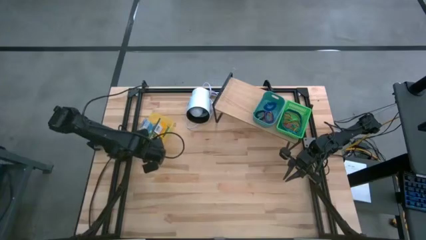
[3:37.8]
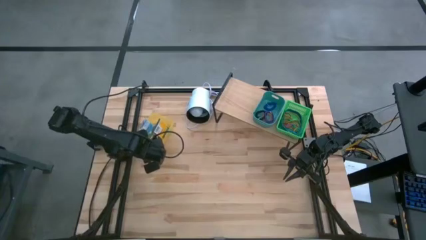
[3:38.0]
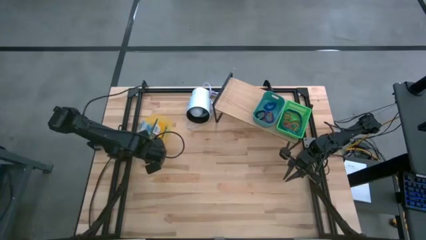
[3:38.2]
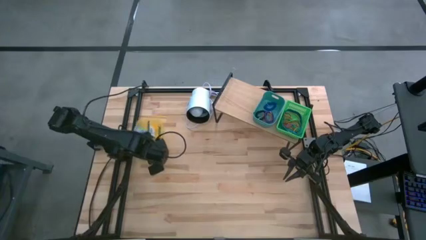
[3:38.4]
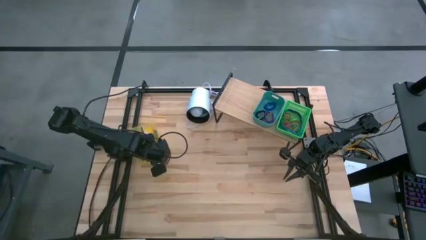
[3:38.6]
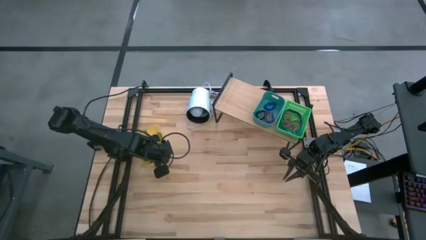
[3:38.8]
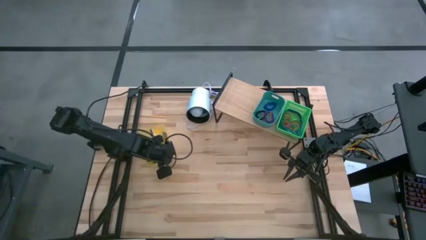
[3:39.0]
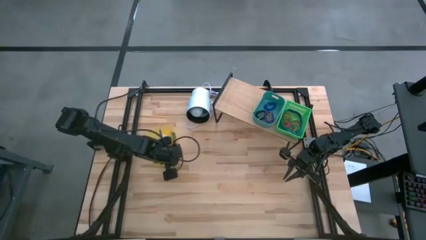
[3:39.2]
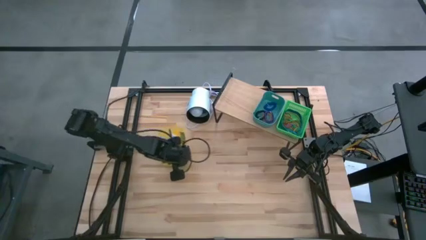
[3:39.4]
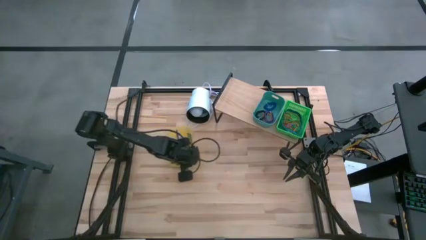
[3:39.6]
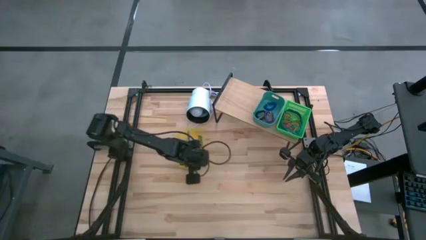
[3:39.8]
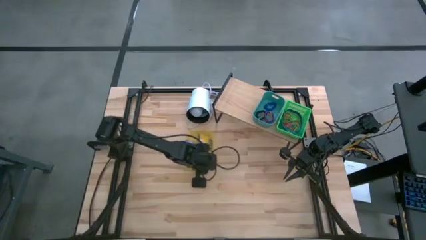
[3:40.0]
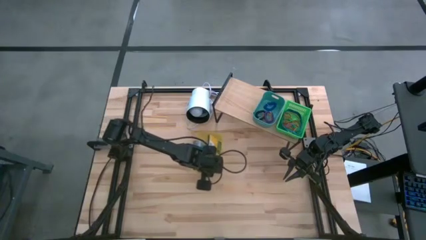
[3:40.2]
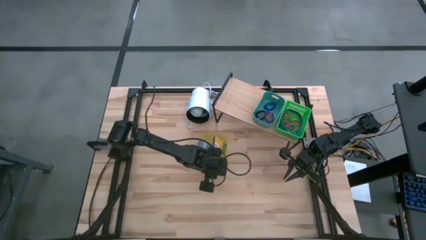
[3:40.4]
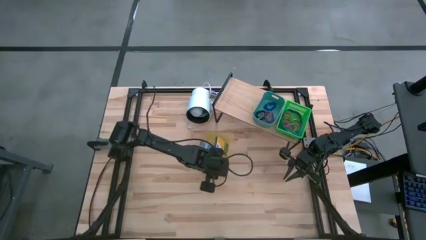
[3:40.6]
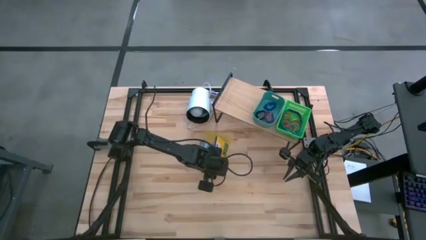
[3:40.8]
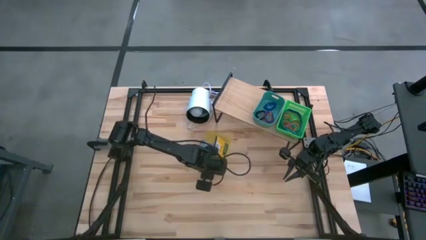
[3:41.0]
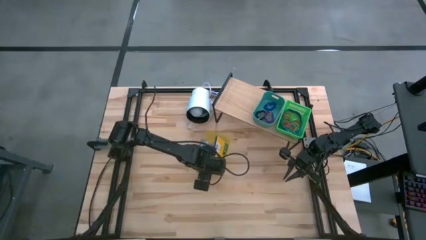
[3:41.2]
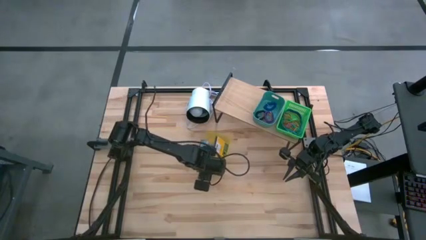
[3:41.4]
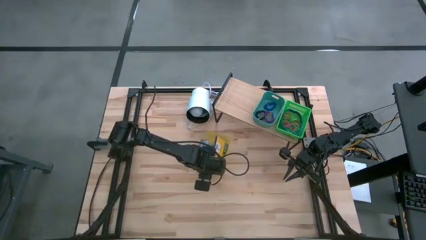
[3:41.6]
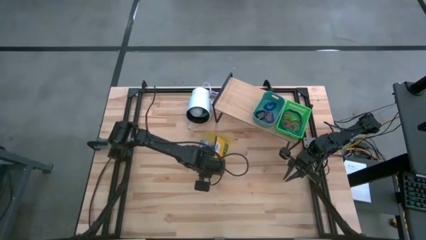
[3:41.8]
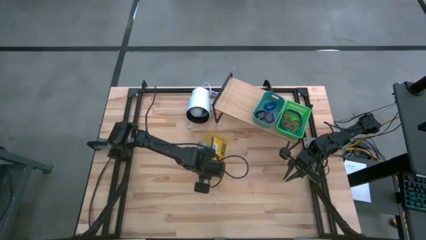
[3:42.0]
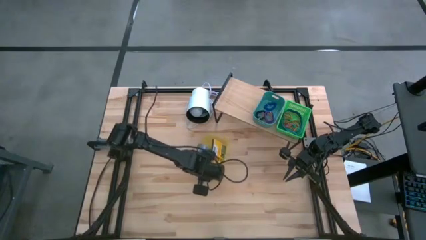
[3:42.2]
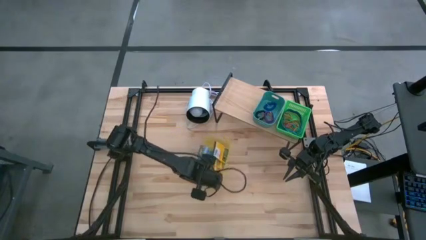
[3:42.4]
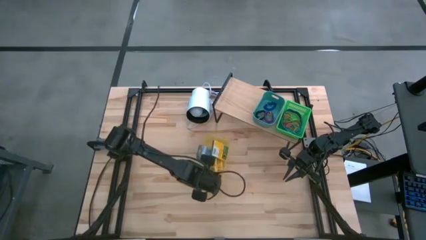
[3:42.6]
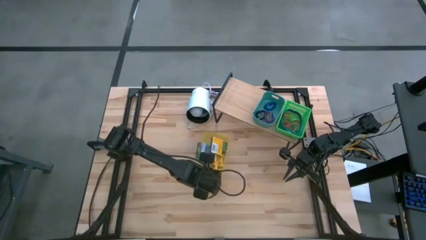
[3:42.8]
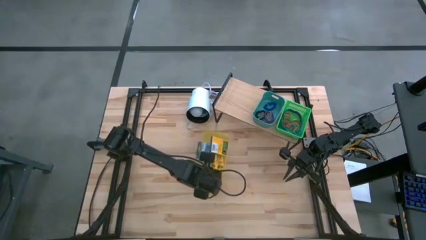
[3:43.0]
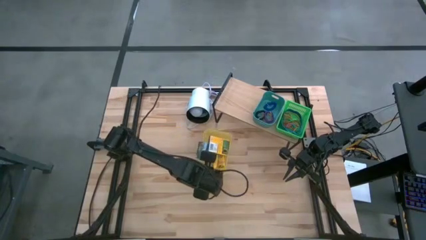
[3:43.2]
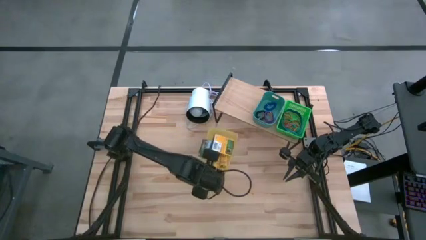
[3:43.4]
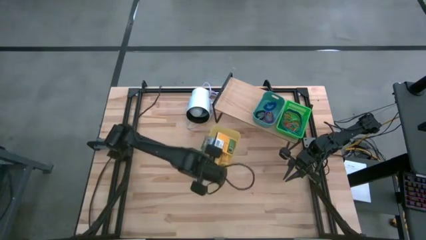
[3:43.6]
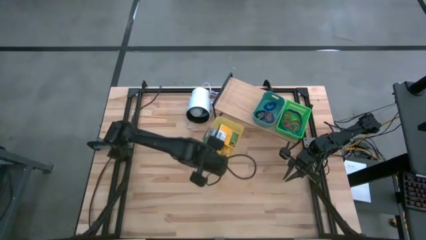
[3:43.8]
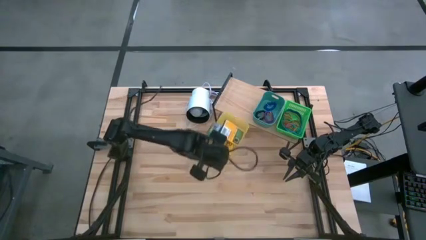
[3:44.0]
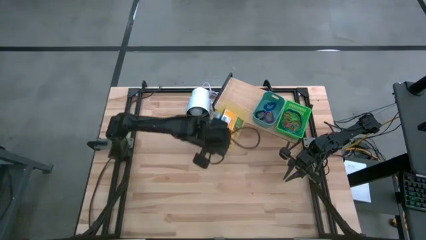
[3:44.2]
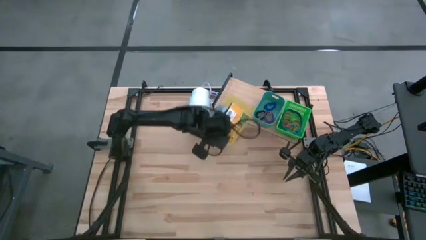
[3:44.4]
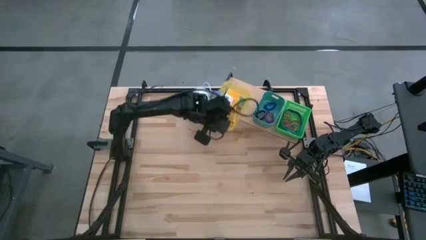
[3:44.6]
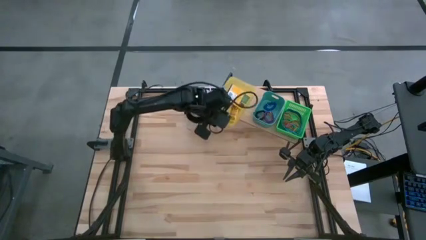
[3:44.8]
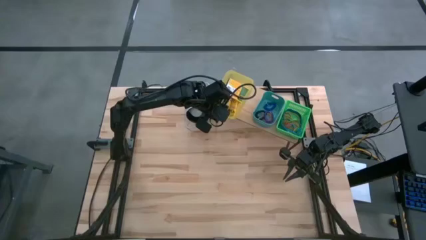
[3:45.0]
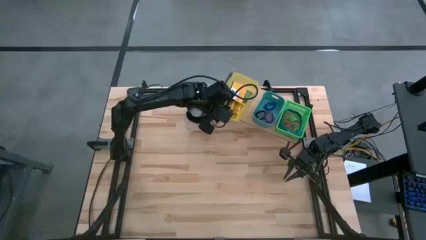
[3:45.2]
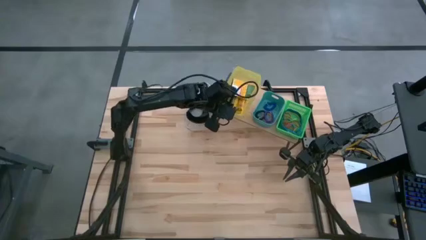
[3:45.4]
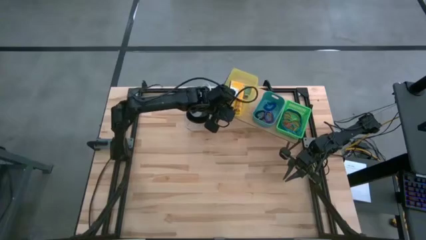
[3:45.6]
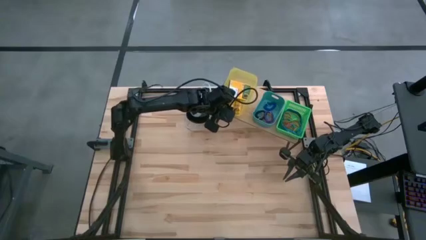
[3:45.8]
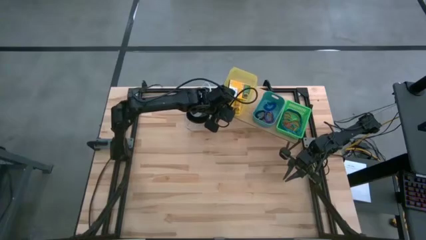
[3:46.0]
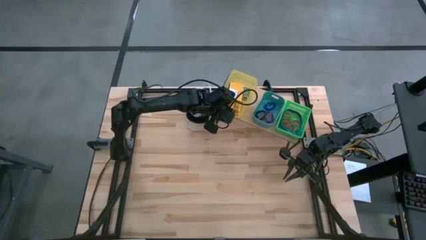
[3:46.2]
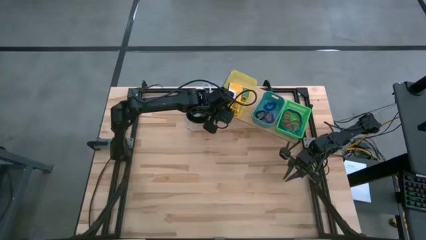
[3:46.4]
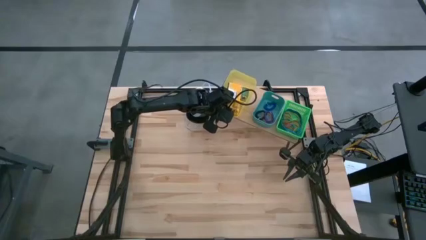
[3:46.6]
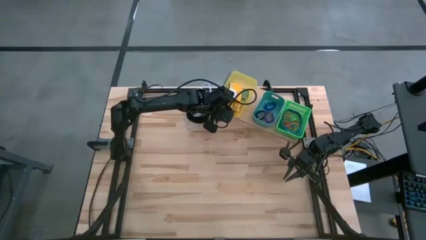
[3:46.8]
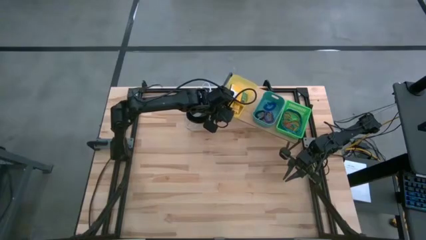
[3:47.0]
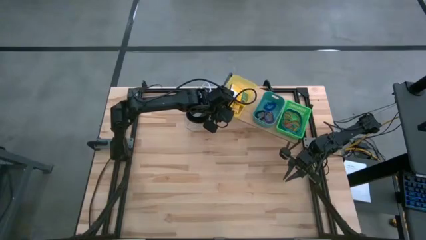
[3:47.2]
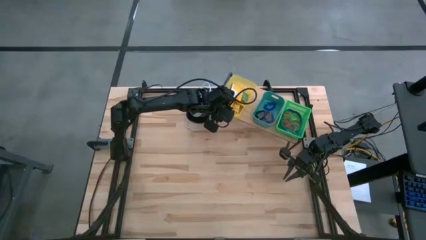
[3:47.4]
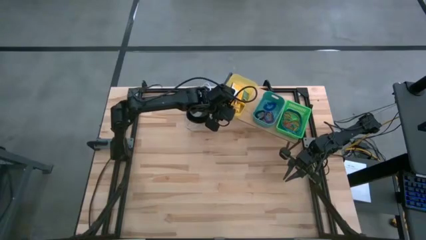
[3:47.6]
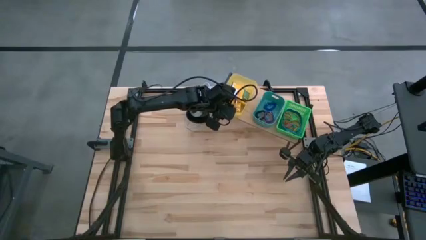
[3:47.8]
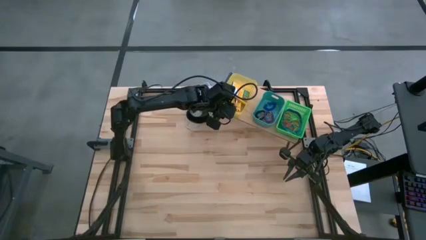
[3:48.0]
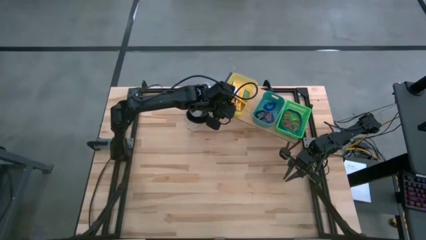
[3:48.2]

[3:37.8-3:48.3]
Task: Pick & Place Office Desk Supplies
Put the yellow bin on the shelf

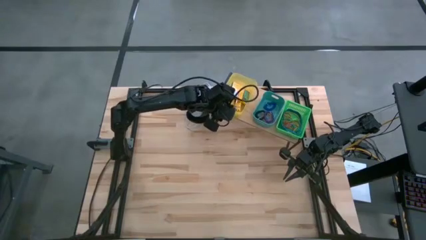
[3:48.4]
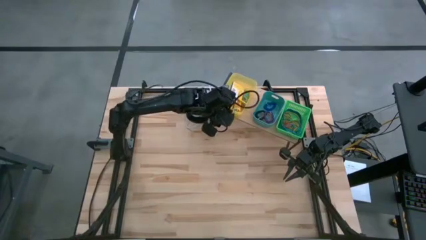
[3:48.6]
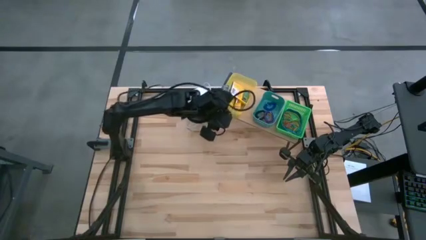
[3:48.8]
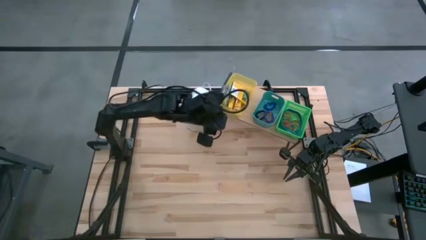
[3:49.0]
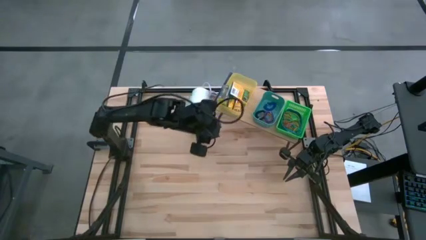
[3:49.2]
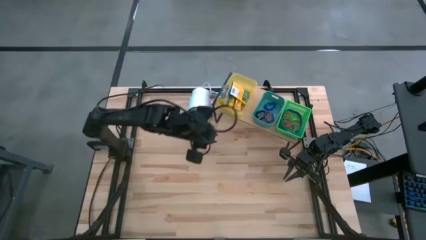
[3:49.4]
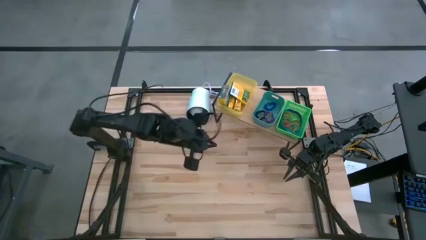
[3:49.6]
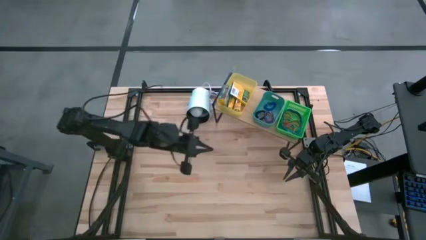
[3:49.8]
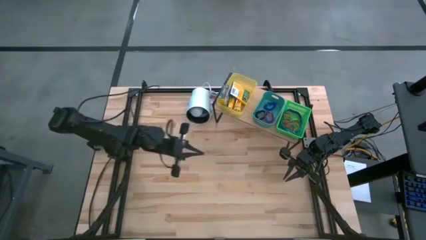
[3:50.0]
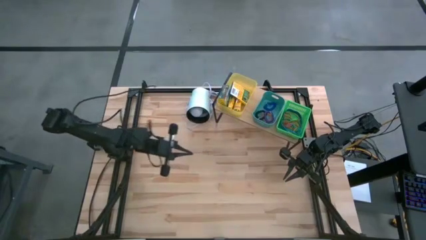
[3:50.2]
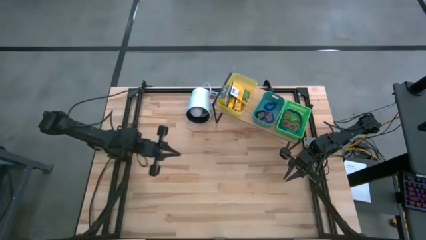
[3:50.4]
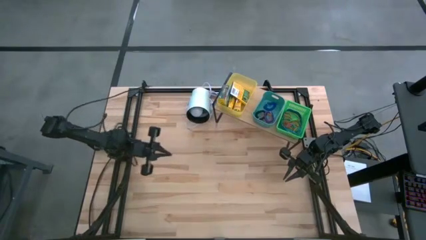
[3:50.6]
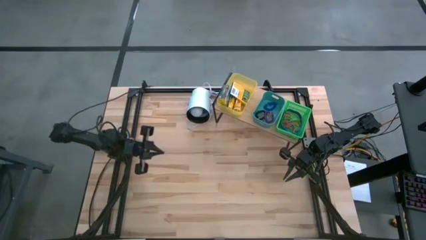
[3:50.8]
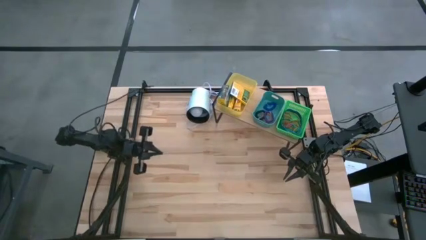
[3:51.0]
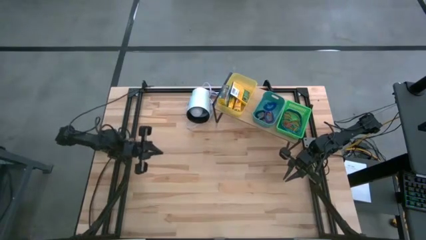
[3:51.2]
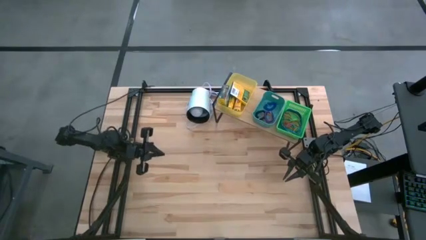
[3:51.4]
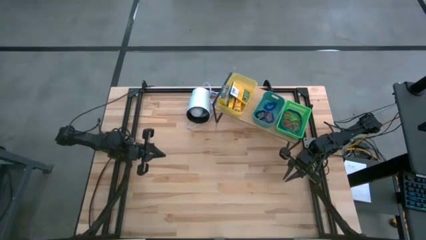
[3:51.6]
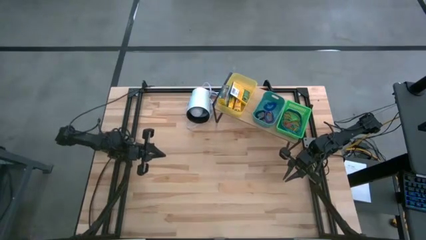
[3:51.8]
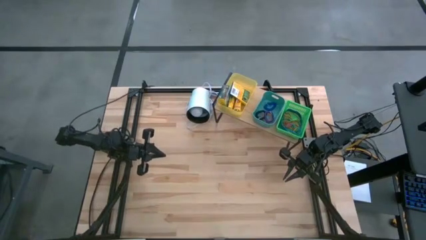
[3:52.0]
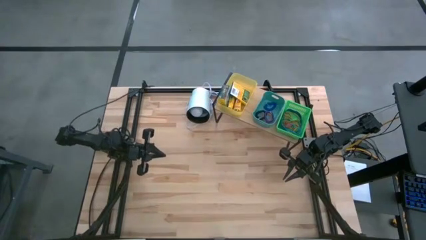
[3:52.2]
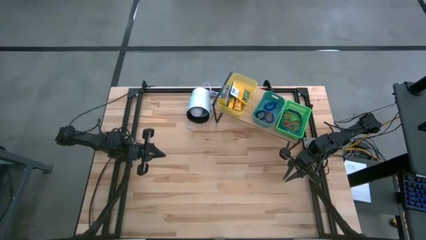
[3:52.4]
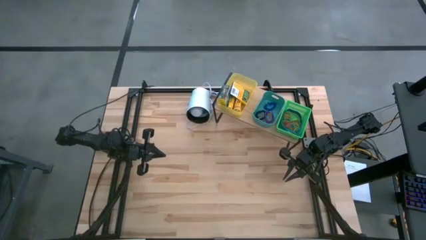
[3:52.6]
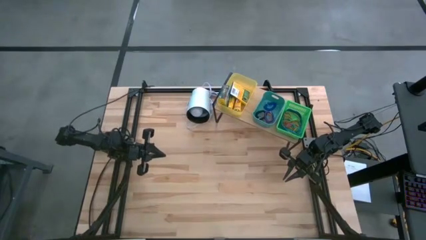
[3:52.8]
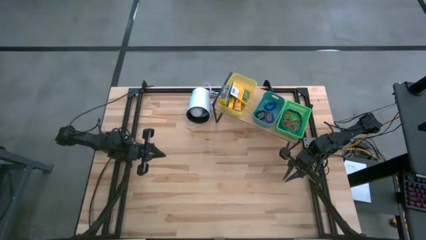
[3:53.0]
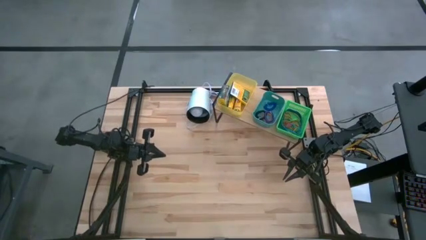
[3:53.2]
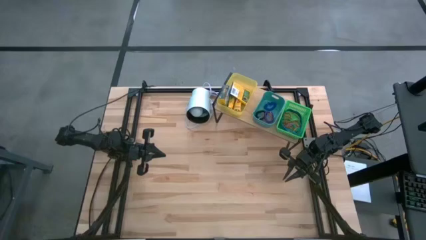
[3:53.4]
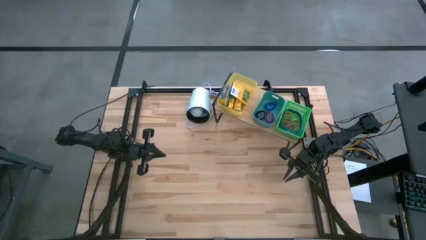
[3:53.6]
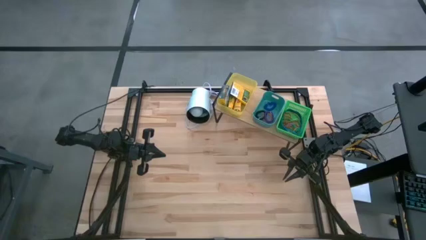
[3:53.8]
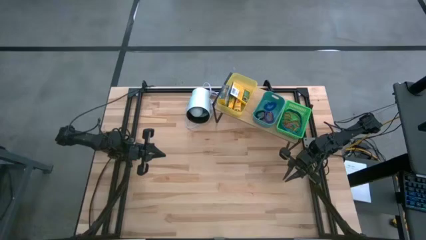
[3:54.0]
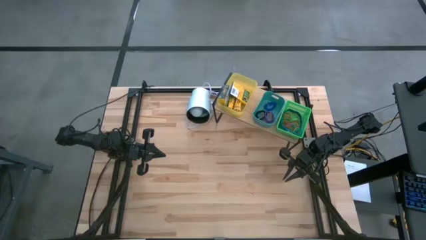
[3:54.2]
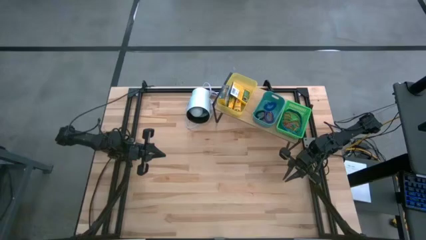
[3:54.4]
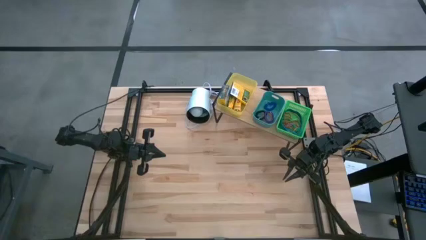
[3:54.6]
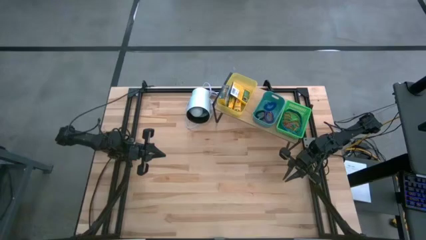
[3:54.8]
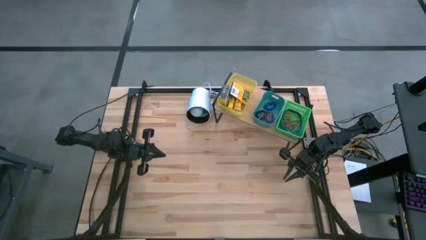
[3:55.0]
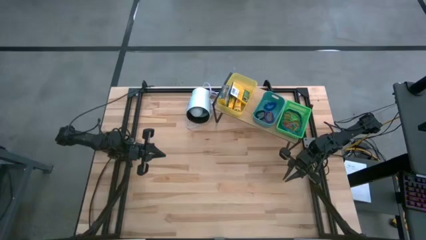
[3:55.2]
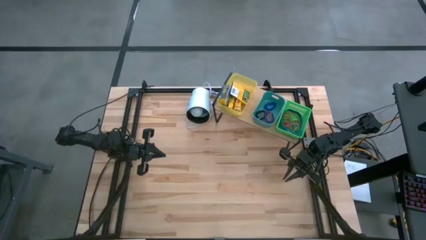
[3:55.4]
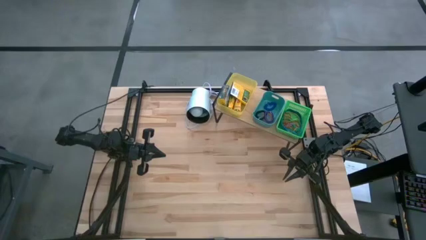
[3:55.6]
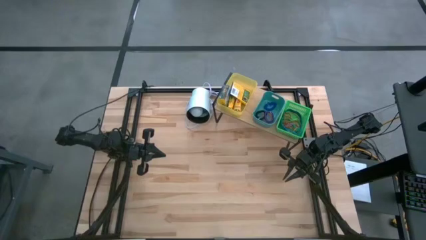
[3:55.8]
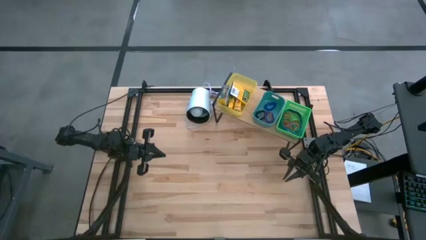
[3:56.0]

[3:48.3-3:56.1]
Return to Home Position
